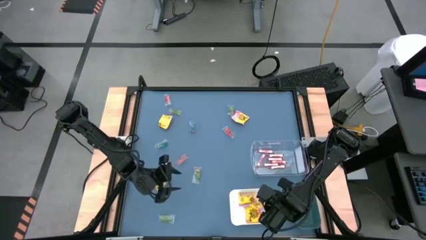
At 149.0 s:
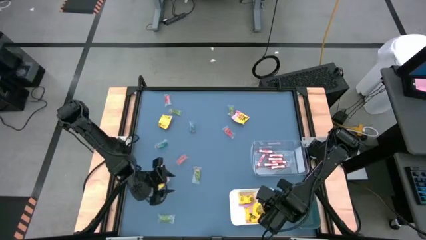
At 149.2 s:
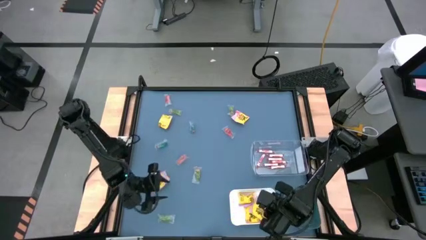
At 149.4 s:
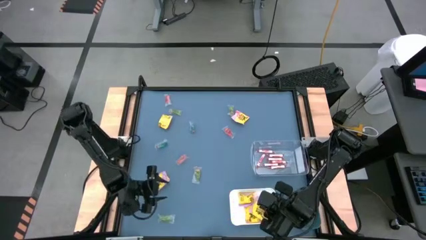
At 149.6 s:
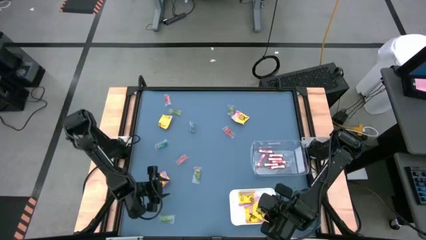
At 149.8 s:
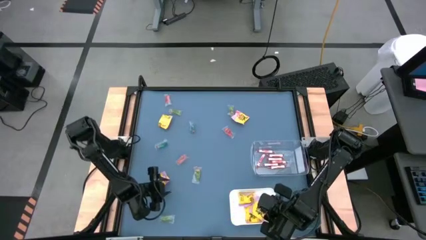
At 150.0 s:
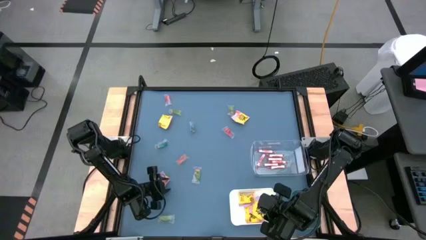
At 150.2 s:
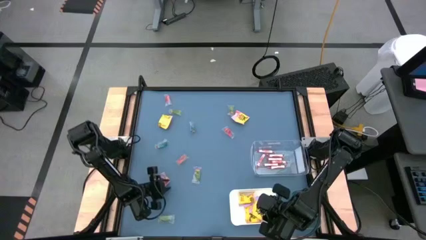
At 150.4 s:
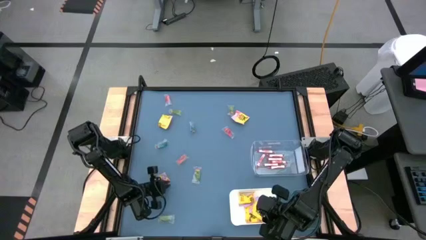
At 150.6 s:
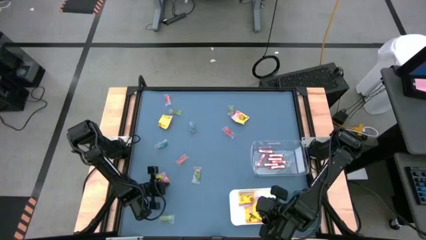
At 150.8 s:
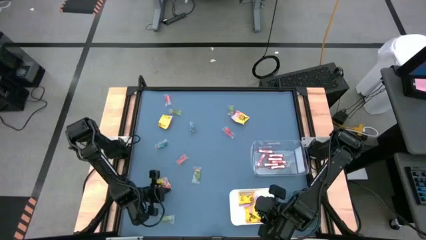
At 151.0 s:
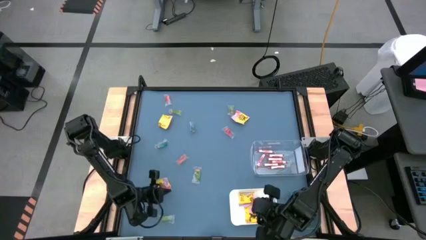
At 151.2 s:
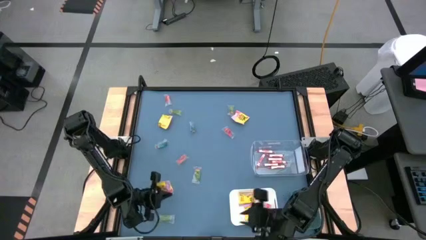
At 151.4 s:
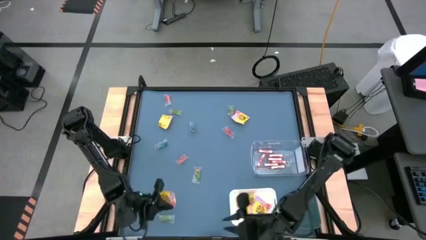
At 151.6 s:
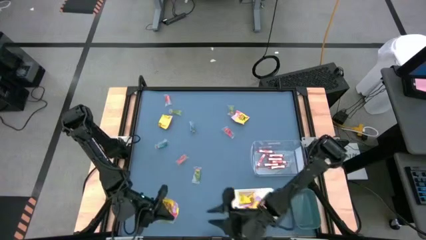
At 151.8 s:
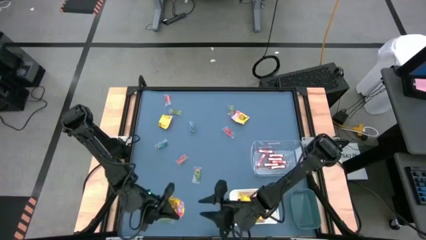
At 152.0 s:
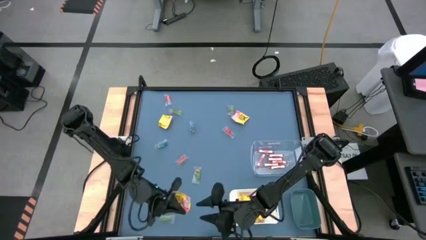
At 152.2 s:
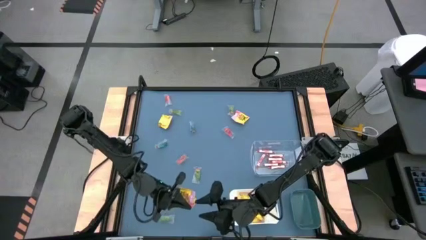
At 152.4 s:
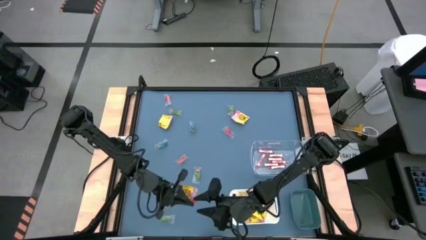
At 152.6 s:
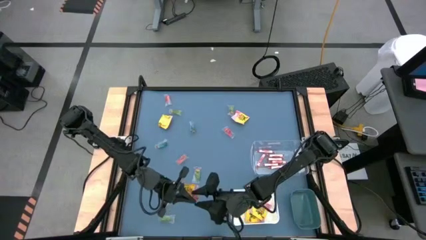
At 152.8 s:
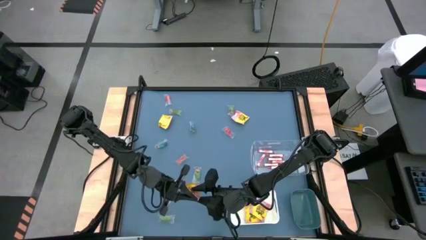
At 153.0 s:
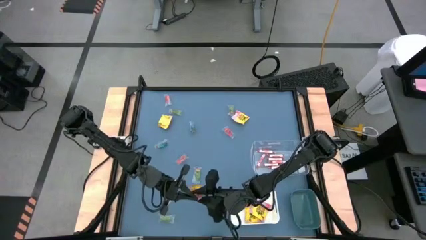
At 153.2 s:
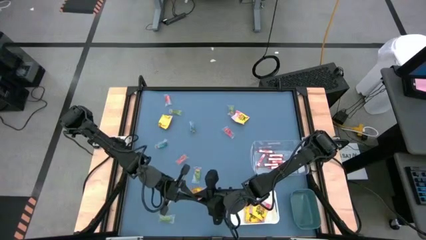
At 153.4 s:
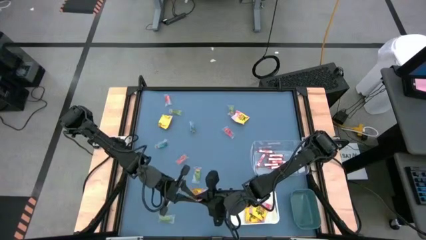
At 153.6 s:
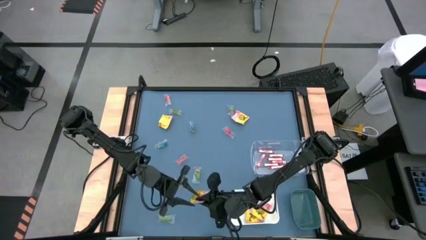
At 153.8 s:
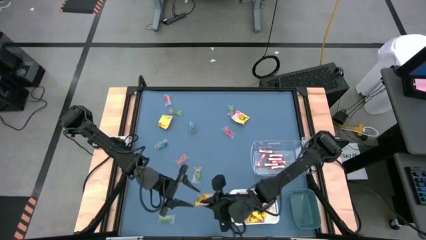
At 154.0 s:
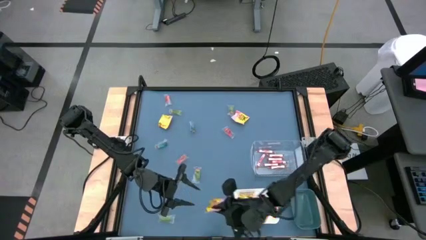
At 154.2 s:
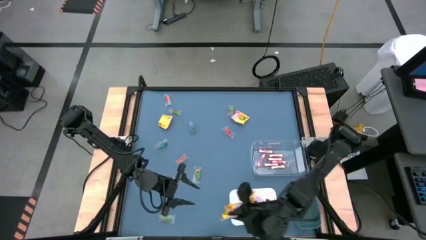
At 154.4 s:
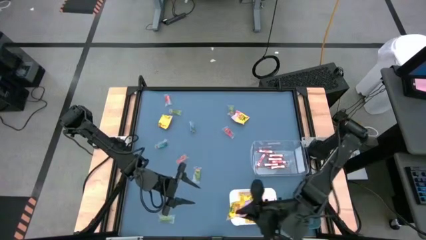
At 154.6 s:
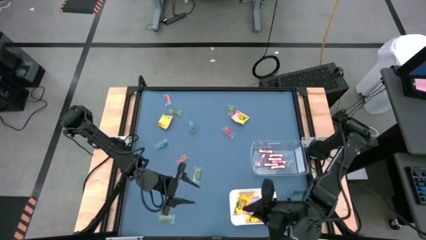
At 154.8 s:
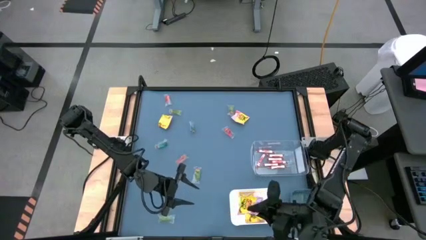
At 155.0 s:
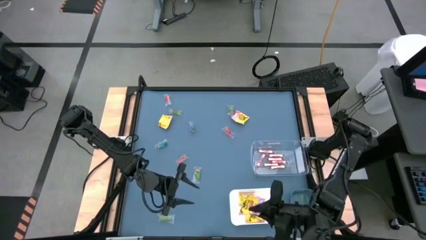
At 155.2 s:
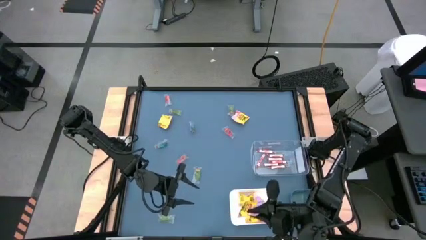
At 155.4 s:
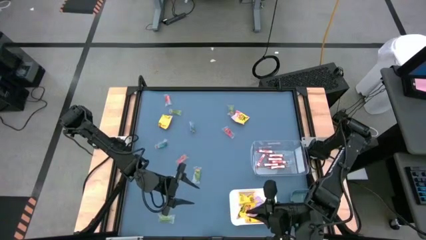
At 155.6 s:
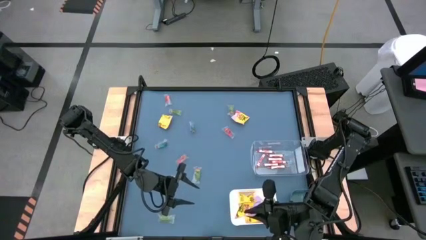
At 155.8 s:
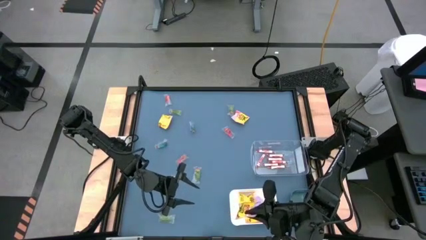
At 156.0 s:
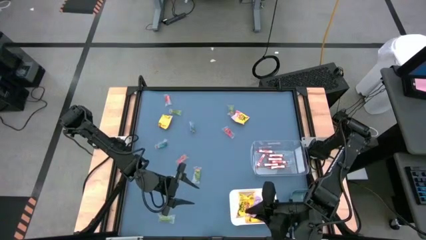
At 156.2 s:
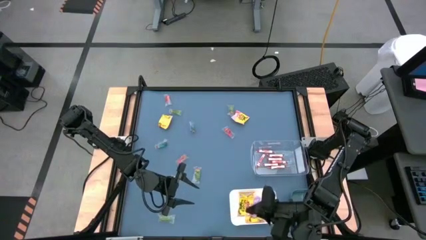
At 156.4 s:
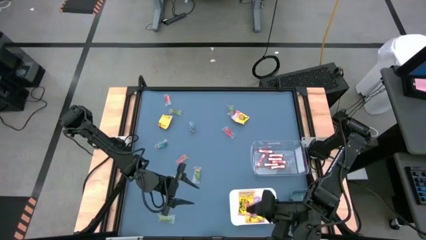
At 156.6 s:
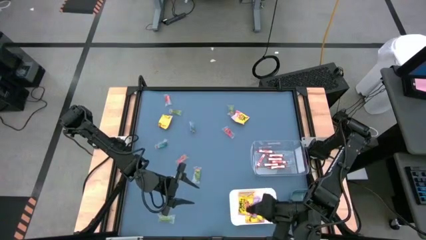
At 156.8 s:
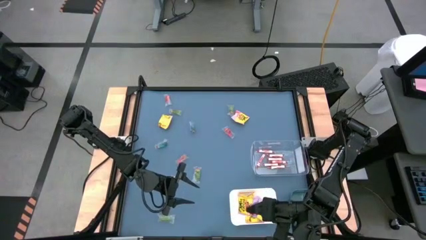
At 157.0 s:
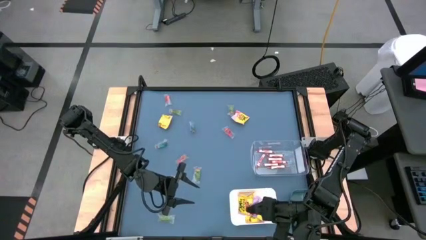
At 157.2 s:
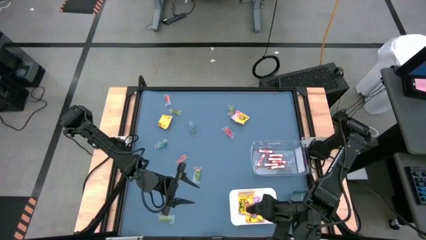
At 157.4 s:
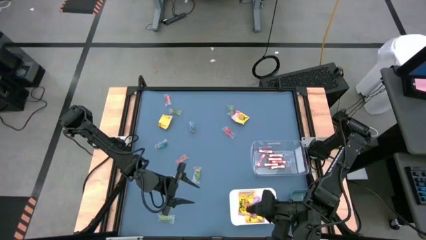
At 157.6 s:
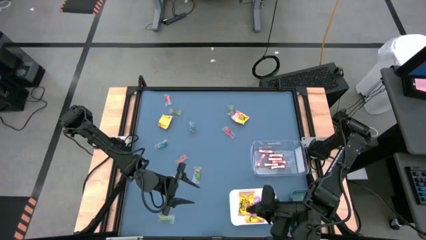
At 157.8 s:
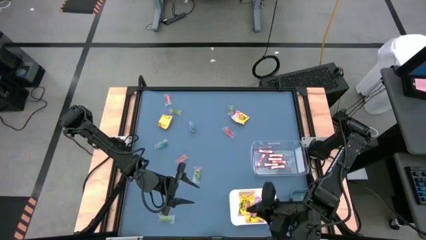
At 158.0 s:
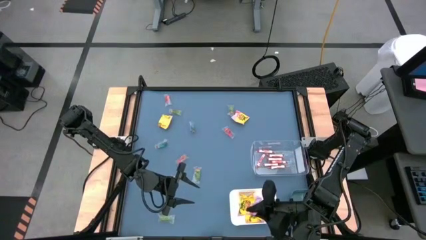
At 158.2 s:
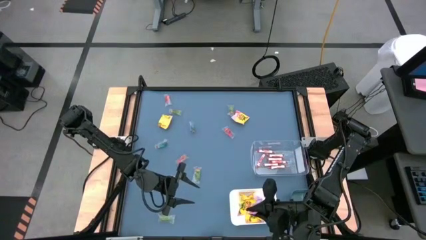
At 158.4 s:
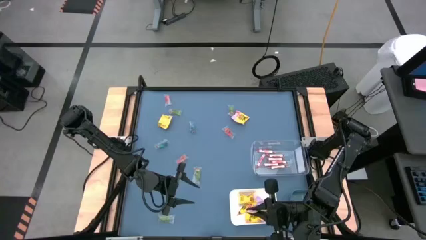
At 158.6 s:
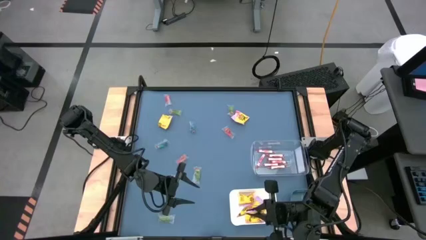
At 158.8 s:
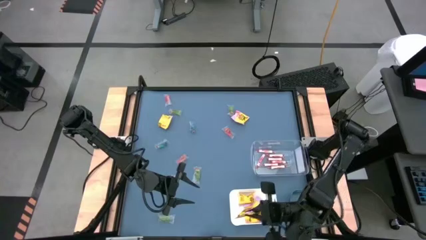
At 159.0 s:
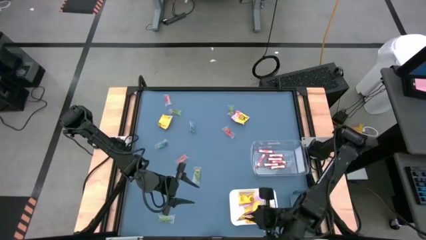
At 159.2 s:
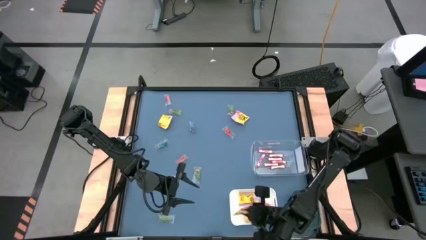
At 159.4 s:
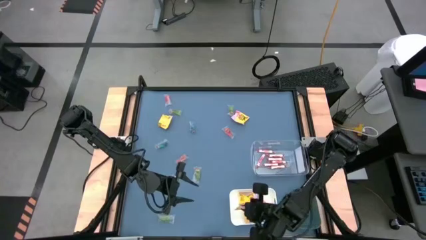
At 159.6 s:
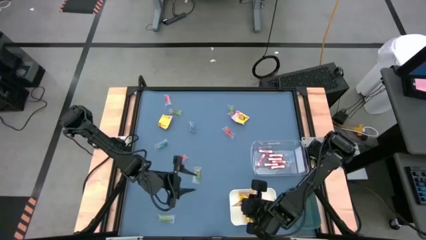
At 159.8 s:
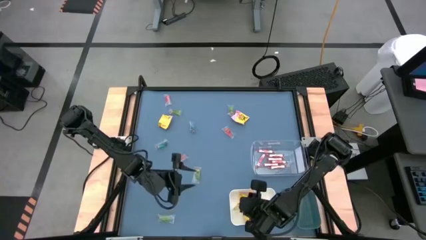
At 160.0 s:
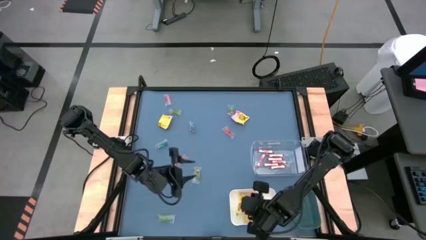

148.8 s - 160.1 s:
Task: Sort candy
Put the yellow candy into the white bin

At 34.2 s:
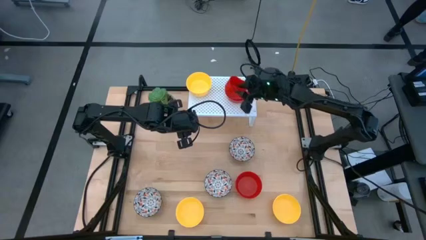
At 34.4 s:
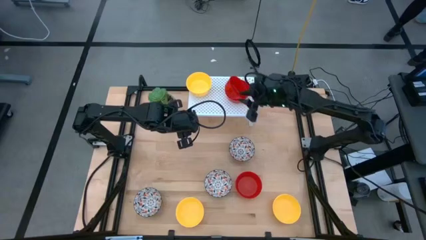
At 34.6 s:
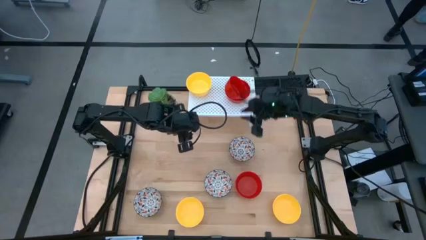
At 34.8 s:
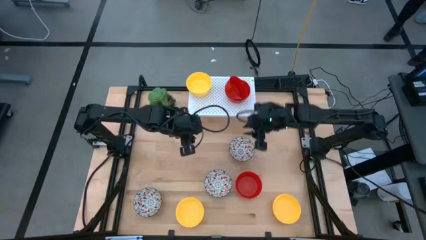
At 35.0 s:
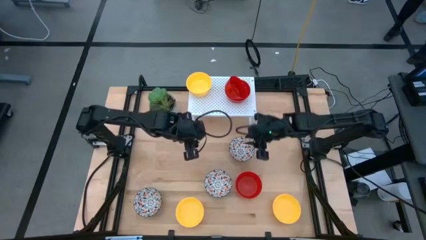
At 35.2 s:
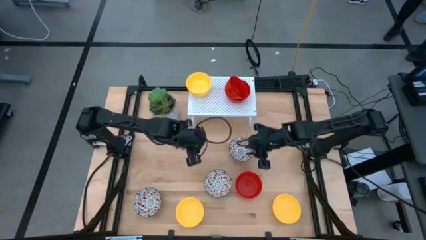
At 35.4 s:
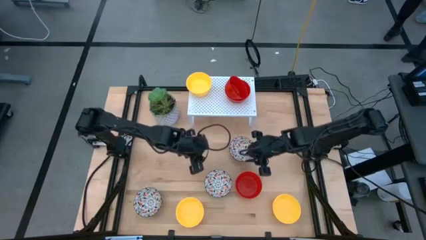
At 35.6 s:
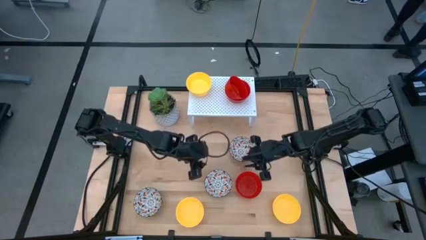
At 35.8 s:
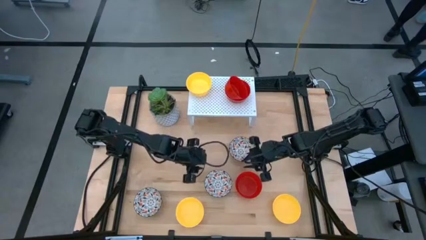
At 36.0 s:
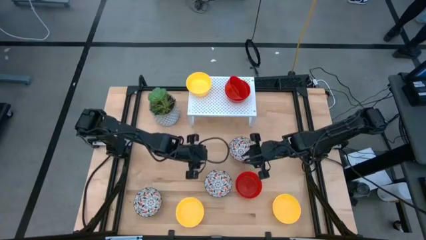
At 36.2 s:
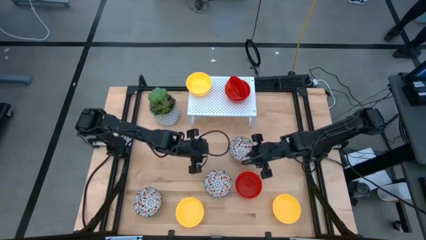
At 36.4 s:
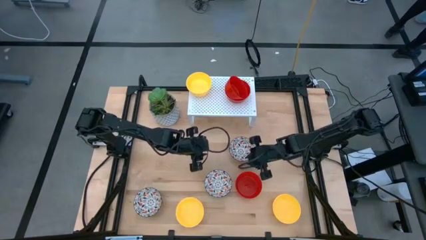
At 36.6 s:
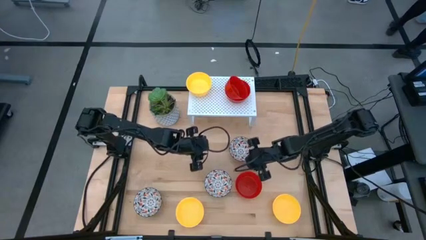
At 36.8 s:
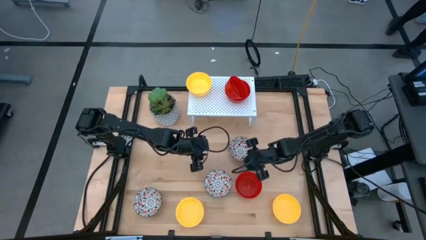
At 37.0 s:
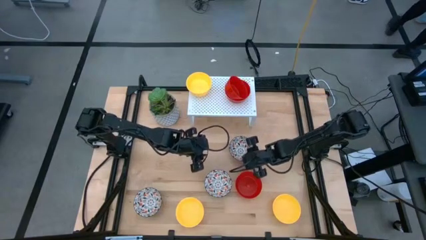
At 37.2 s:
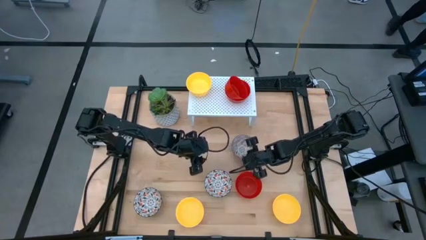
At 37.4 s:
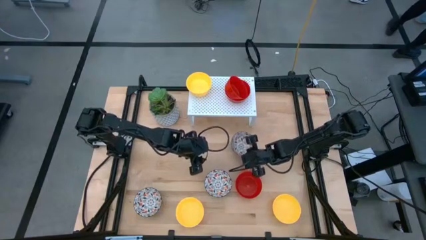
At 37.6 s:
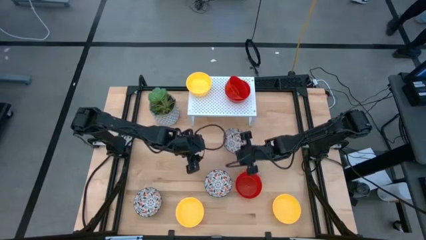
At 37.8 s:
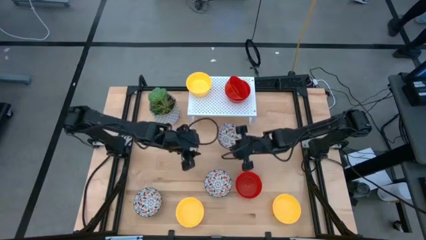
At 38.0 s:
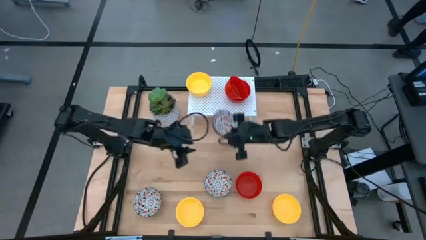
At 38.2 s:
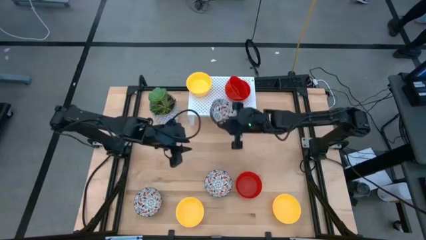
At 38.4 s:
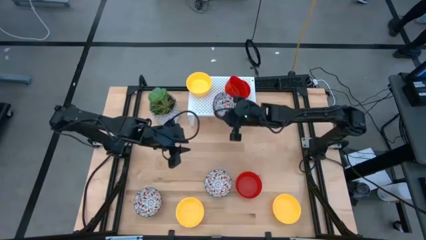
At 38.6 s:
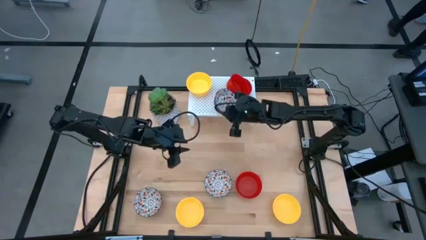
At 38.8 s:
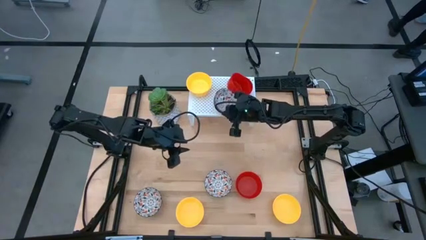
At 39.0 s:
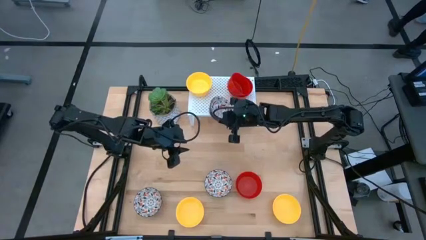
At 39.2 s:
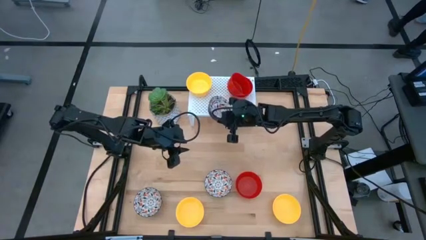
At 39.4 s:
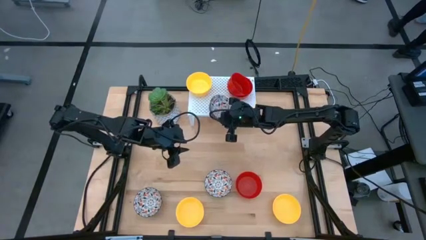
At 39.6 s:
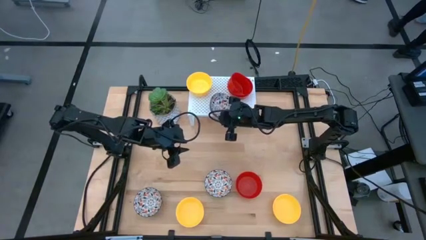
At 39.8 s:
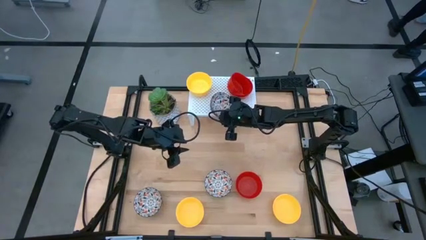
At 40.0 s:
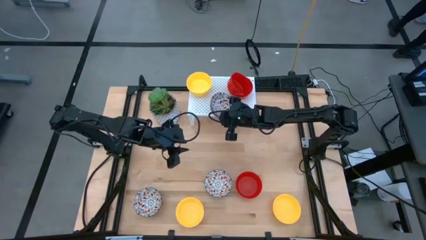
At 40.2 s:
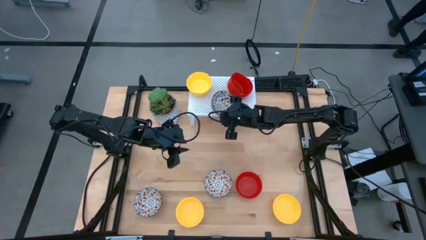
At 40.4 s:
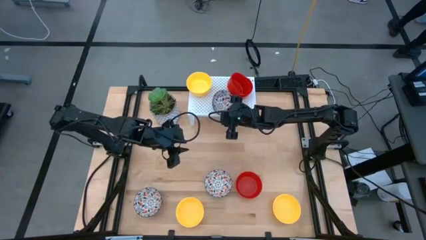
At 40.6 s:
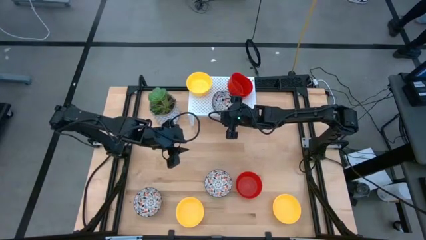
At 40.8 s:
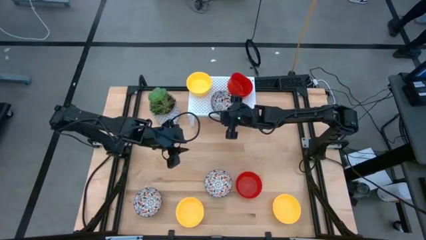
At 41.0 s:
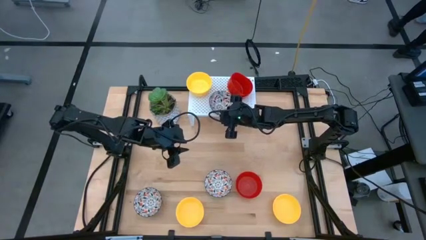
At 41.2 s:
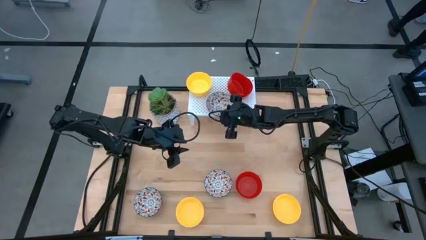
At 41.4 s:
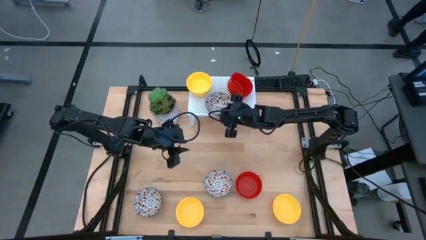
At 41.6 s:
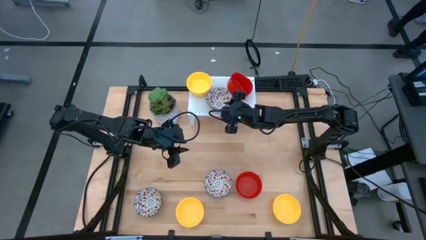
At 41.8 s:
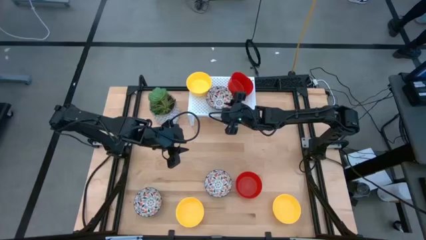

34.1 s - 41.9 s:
Task: Pick & Place Mini bowls
Put the white patterned bowl on the shelf
